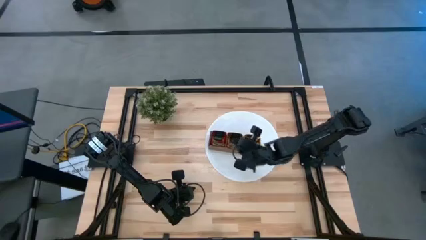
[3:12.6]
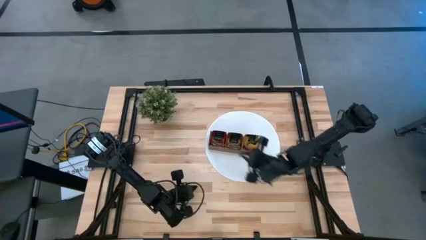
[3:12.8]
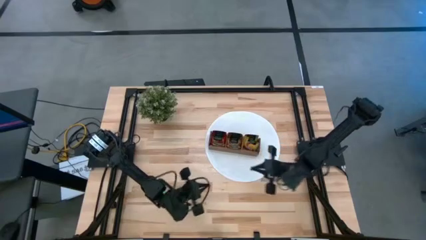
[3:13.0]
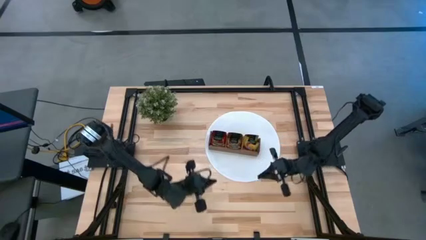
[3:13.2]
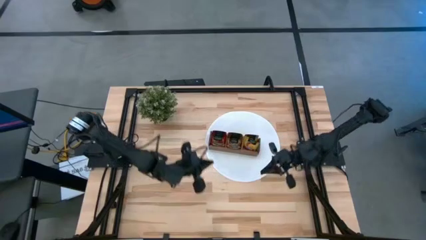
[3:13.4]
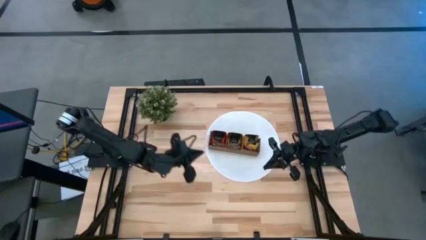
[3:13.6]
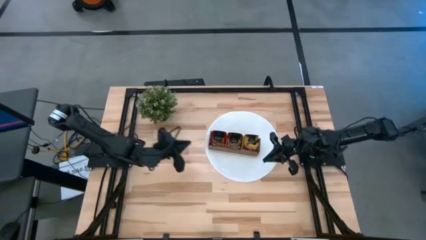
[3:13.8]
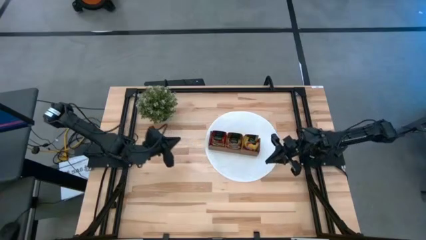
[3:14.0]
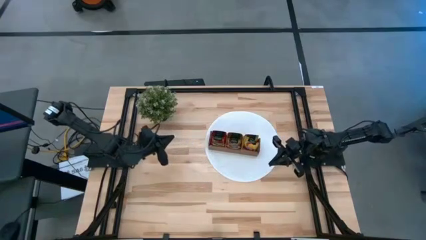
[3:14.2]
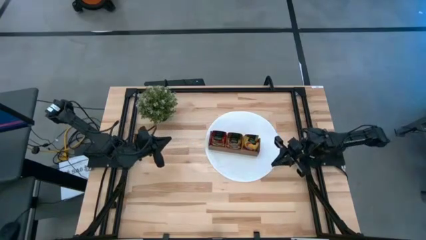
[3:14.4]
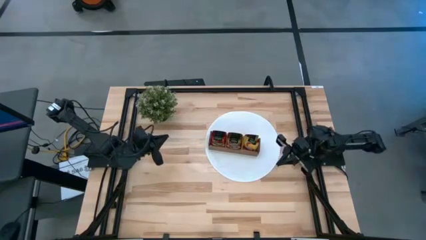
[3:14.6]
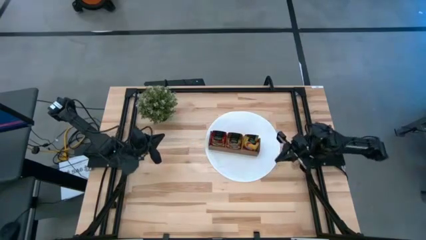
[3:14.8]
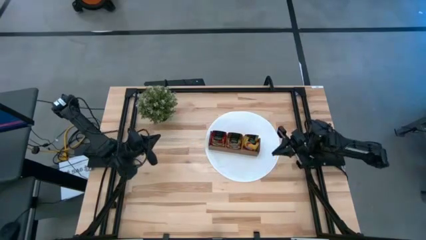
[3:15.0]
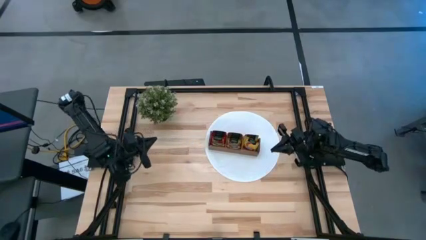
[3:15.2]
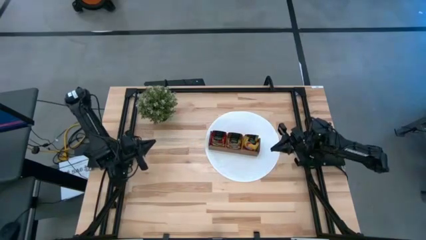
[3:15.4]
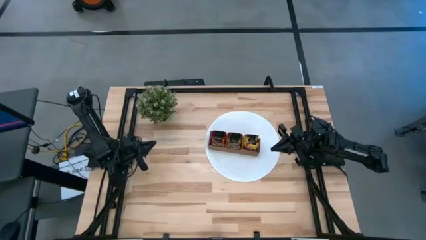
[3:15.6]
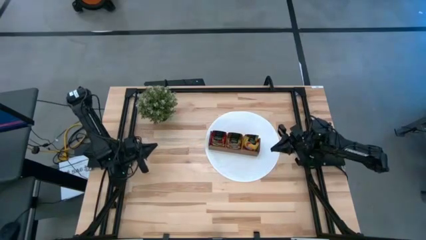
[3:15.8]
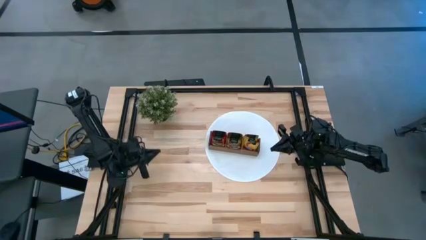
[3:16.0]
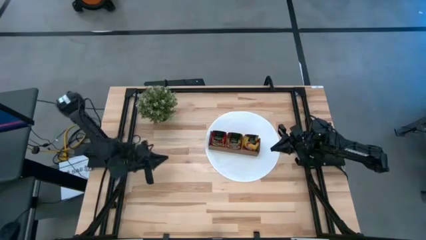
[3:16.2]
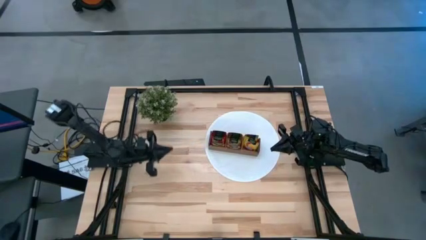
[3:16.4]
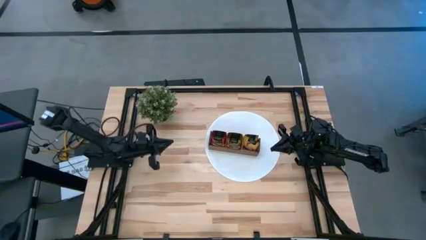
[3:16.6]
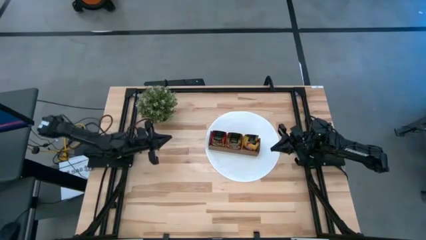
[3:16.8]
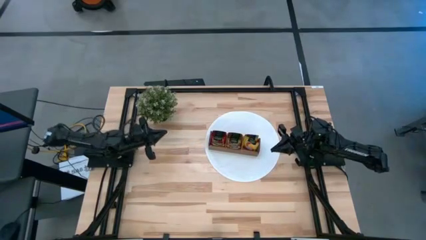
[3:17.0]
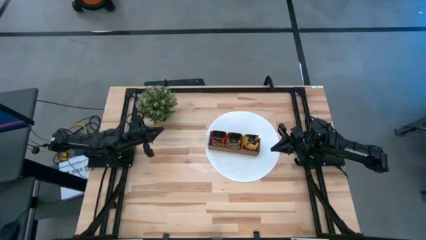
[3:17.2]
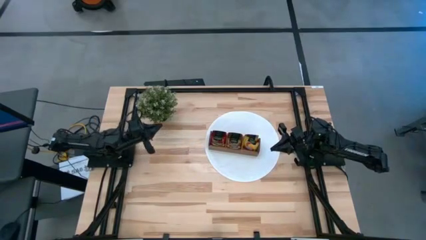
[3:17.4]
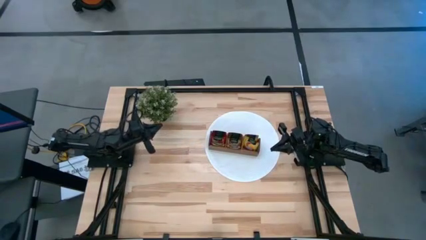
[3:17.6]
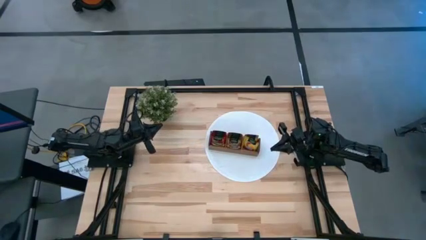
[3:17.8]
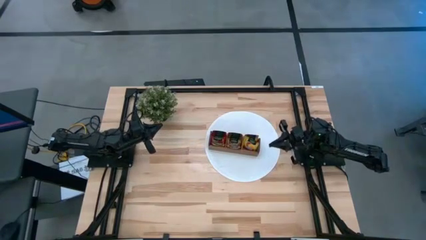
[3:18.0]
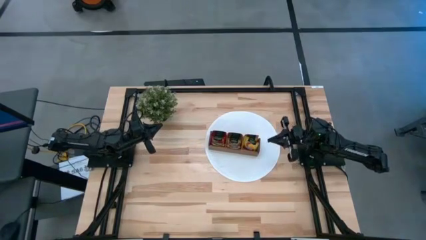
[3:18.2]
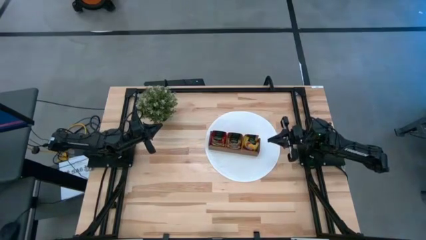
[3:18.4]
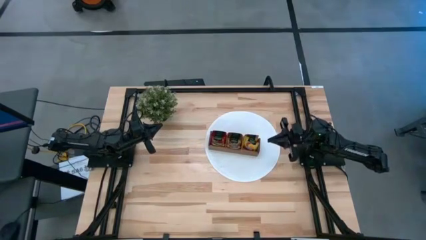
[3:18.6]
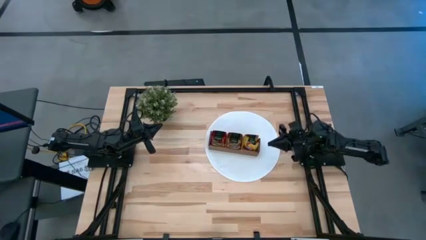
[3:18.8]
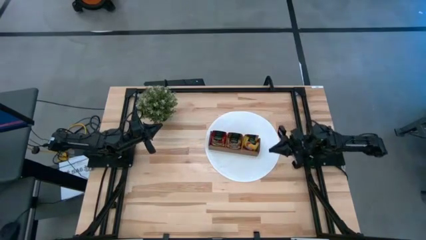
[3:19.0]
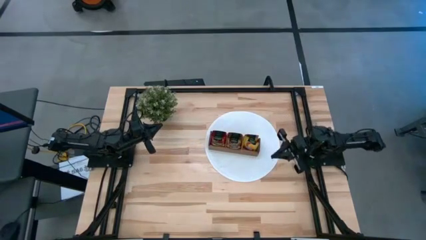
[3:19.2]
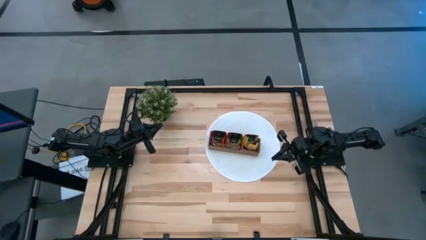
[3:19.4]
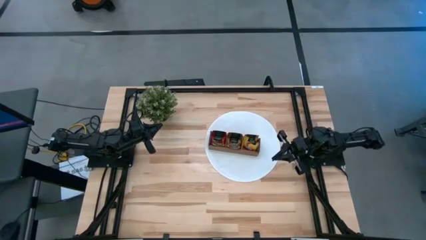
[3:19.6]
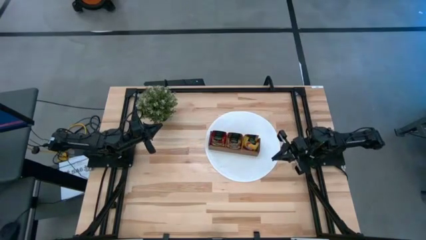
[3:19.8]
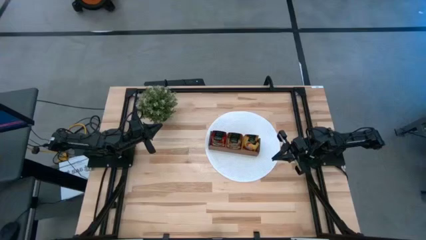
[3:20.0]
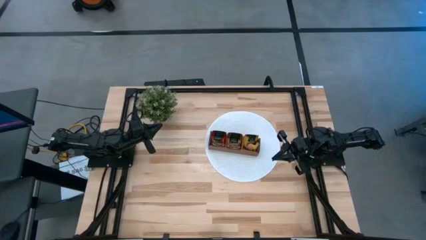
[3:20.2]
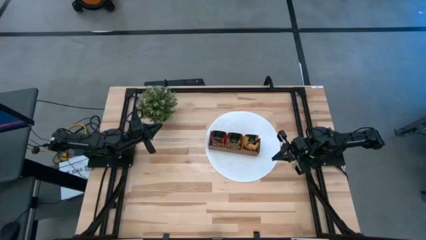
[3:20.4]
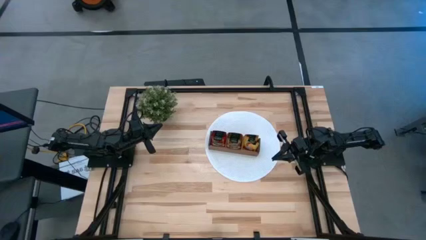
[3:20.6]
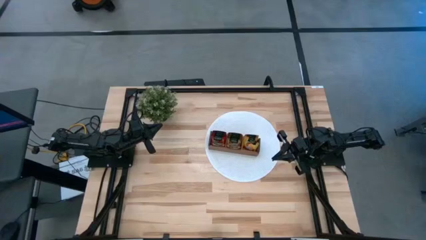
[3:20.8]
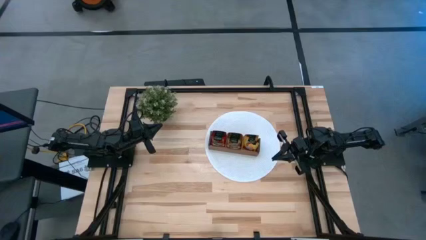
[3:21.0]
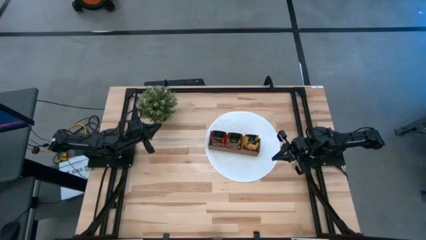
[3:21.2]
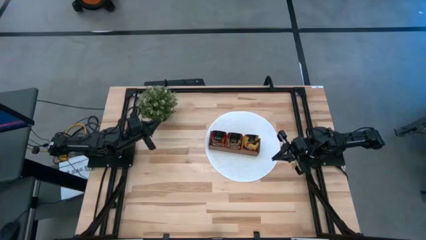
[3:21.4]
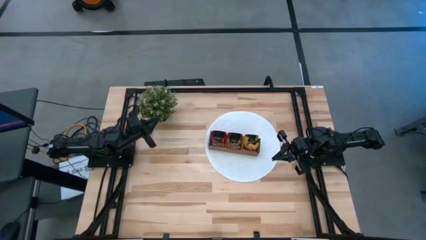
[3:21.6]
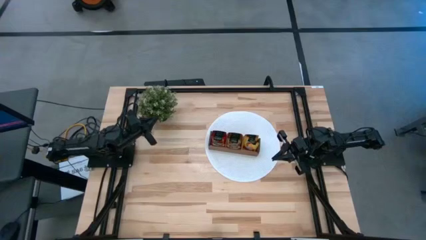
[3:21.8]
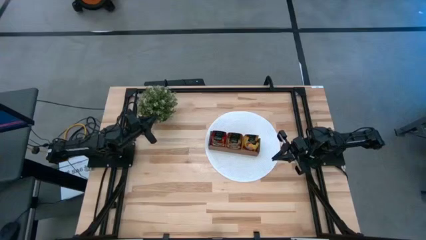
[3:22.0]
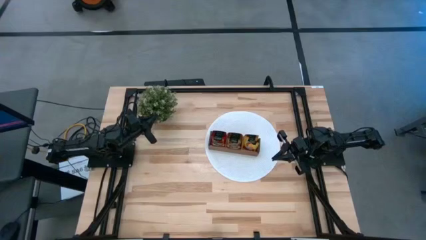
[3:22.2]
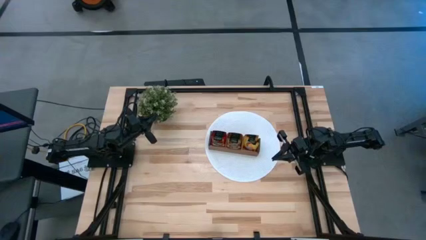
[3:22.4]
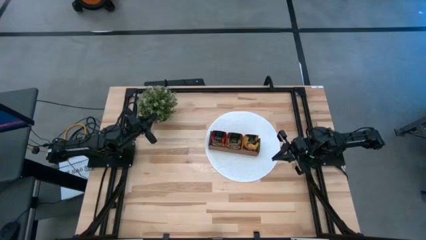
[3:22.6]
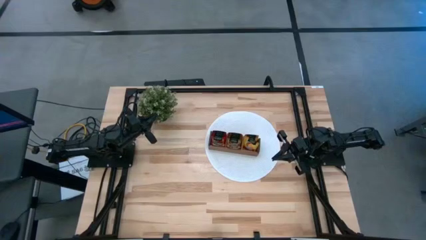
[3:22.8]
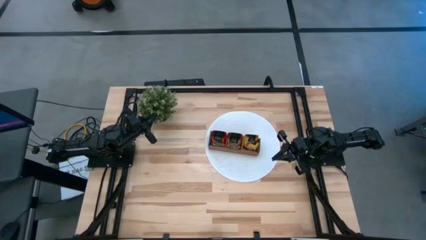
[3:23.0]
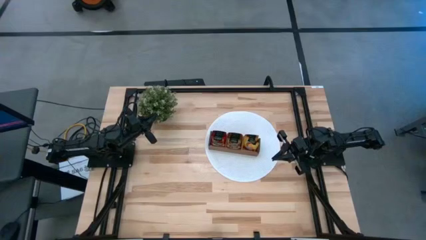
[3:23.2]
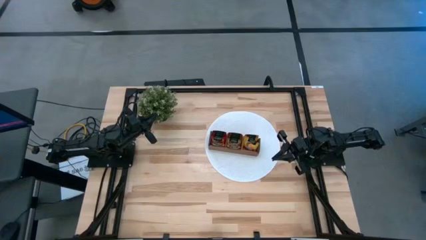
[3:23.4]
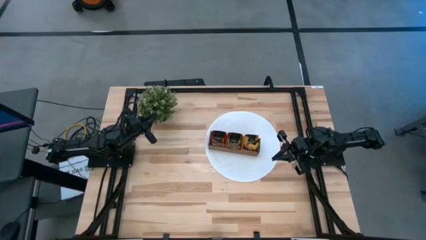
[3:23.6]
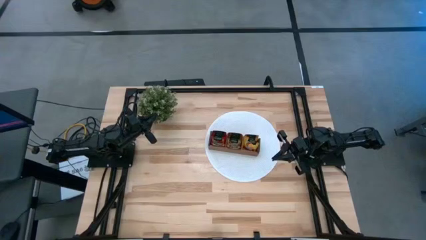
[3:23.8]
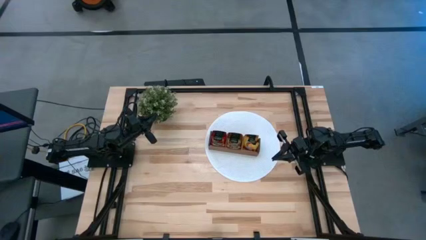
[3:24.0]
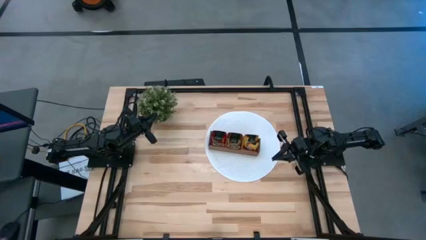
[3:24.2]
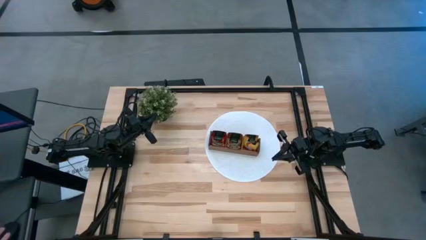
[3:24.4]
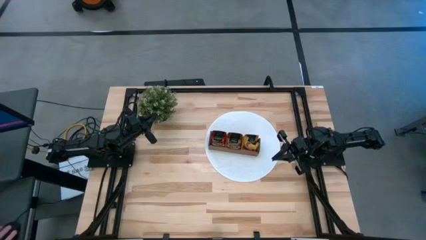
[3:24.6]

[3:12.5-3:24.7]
Task: Pick & Place Tea
Return to Home Position

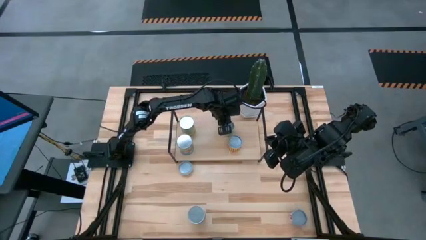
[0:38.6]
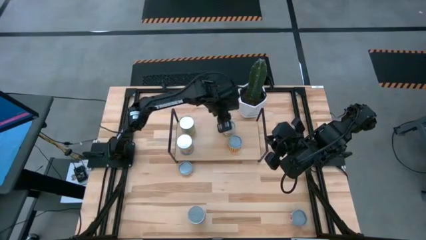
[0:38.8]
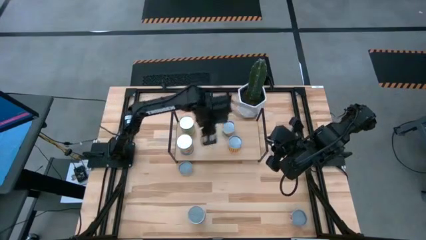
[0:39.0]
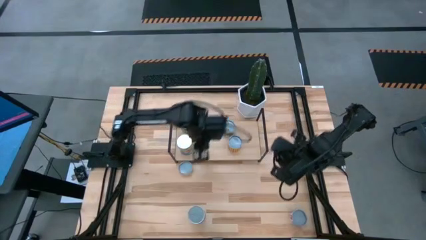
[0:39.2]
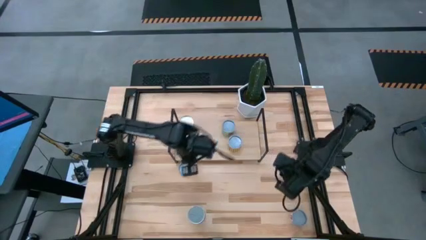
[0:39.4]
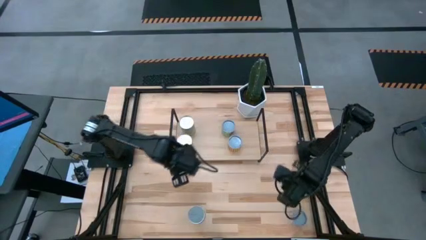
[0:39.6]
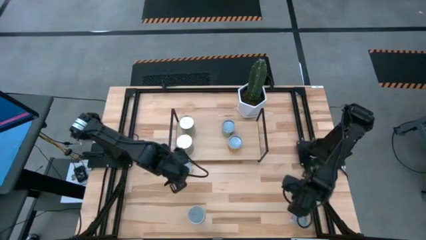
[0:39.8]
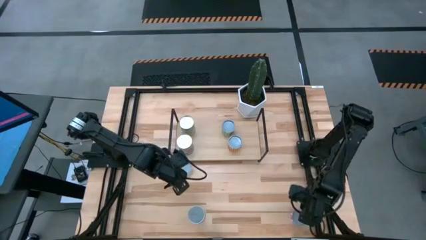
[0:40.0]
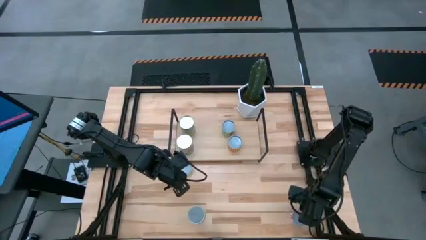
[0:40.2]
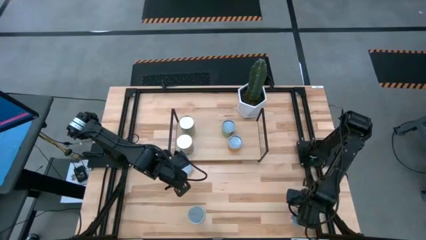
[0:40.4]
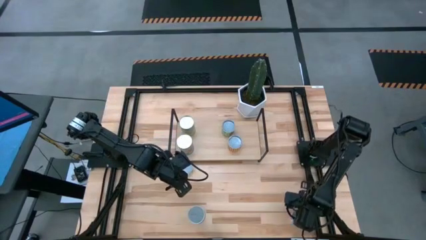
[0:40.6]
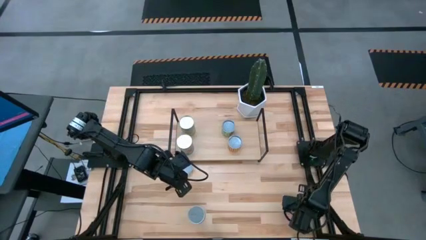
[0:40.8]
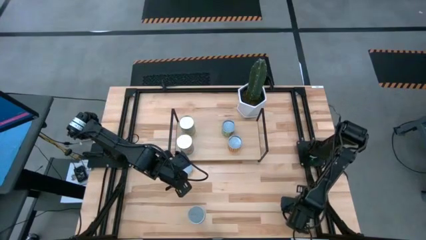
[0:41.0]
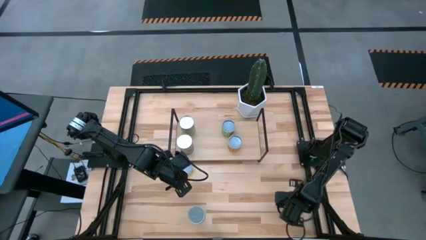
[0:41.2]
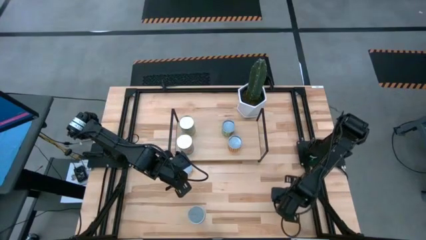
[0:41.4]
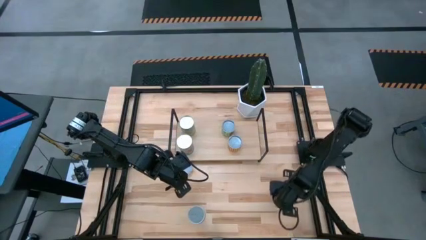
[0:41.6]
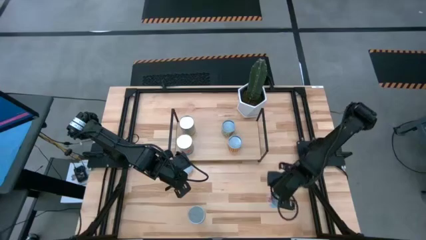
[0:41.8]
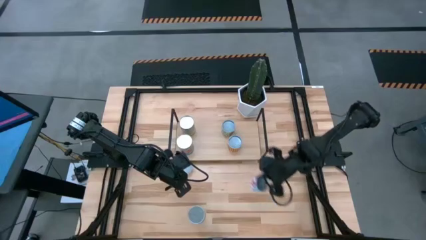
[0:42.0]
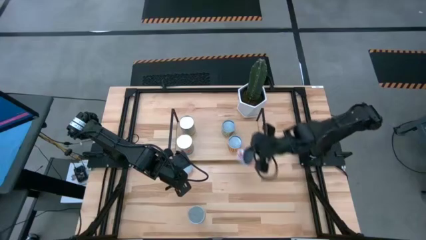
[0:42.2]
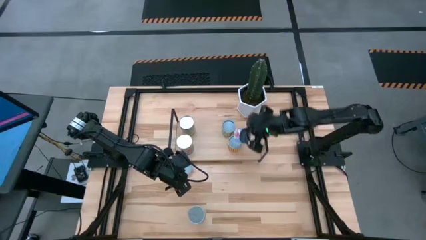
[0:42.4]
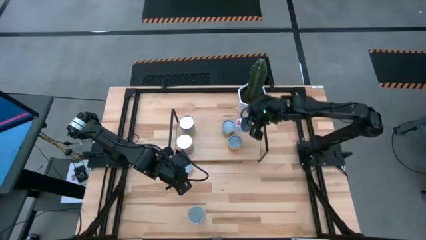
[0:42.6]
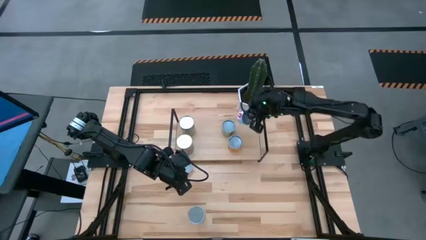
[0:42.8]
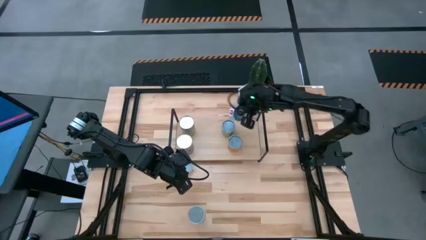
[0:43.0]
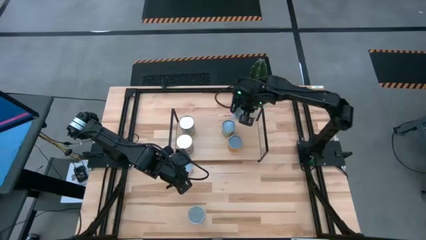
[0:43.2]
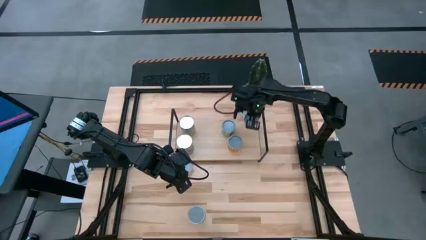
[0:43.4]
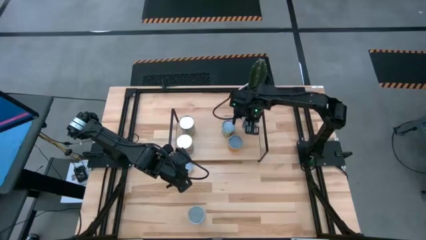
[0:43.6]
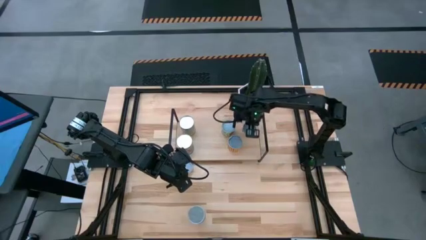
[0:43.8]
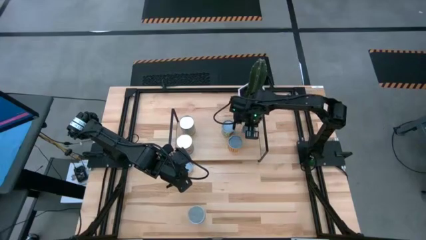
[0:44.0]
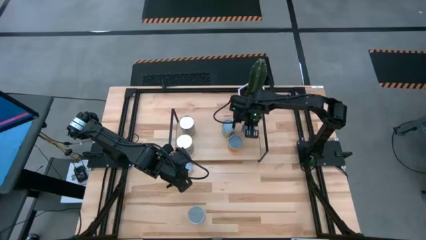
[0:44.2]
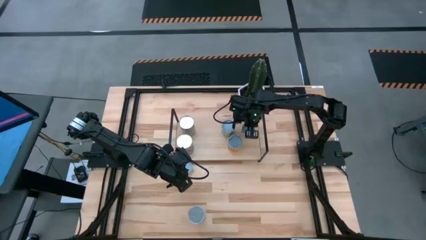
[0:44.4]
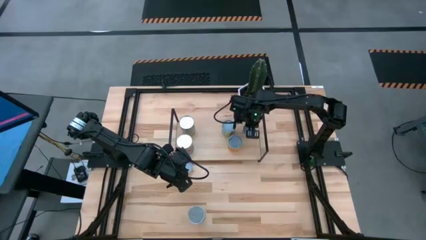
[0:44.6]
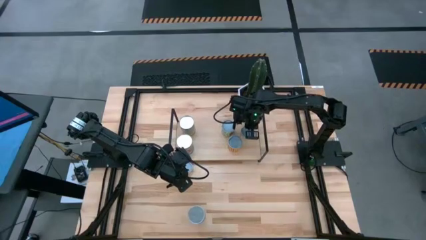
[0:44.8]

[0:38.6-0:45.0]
Task: Pick and place cans onto a shelf
Put the small canned salmon on the shelf
